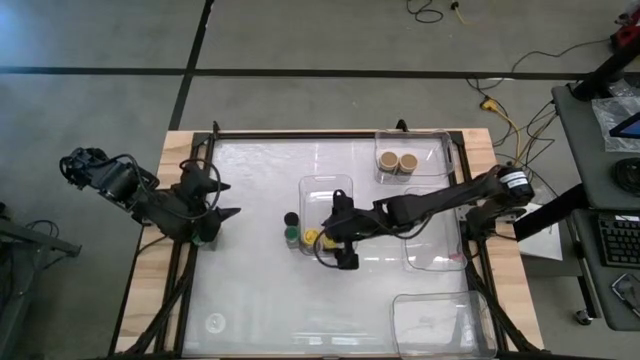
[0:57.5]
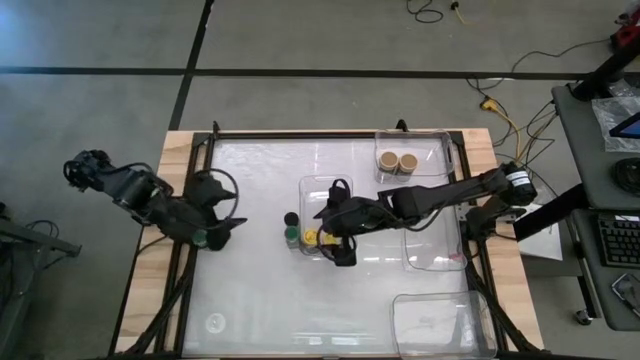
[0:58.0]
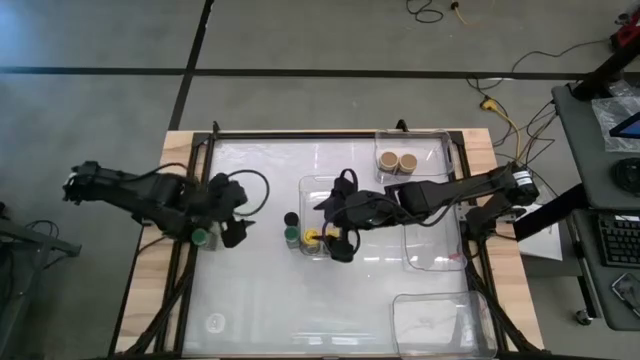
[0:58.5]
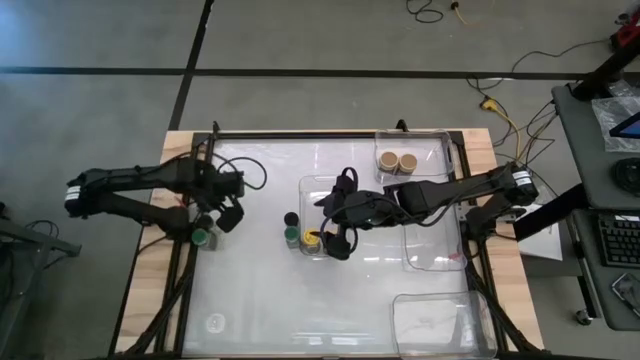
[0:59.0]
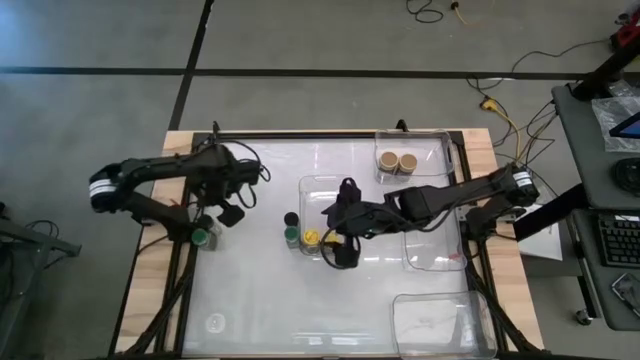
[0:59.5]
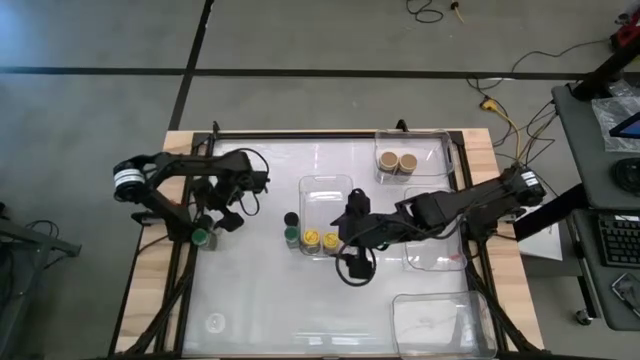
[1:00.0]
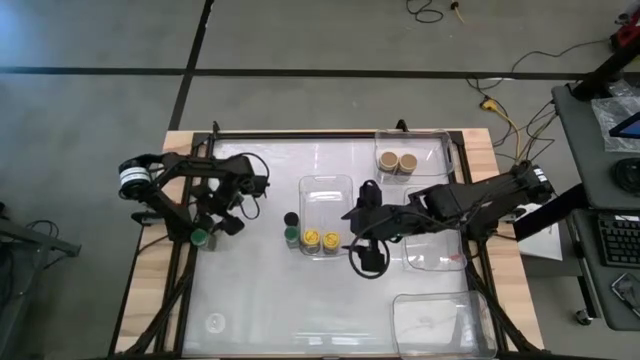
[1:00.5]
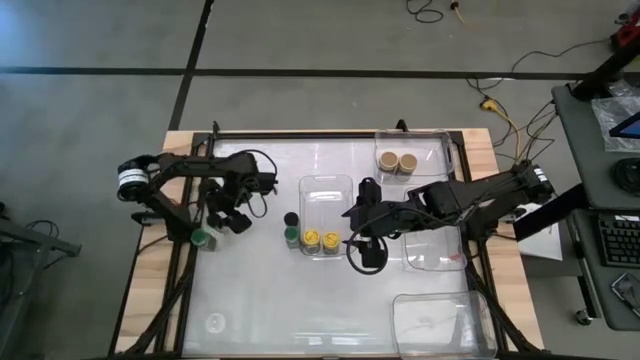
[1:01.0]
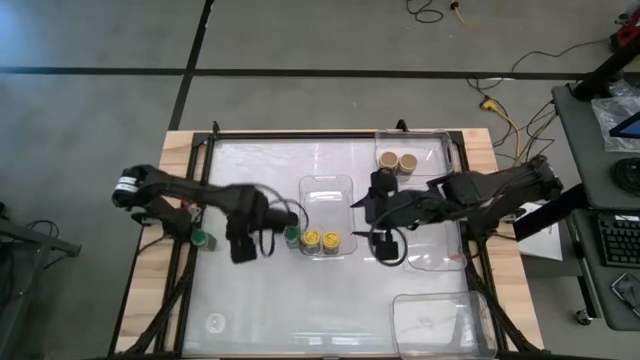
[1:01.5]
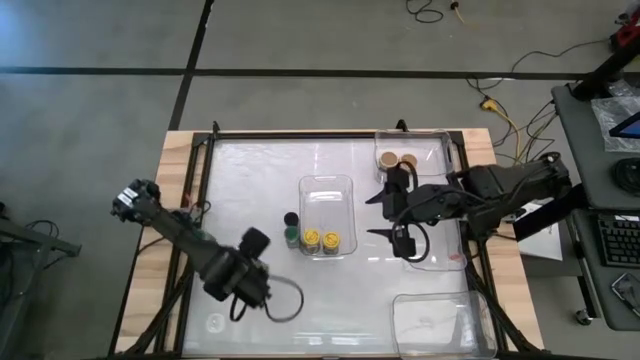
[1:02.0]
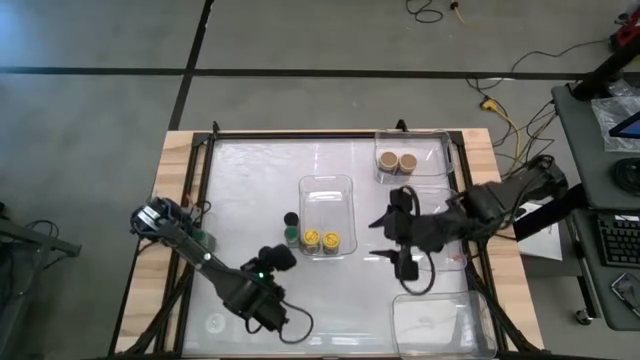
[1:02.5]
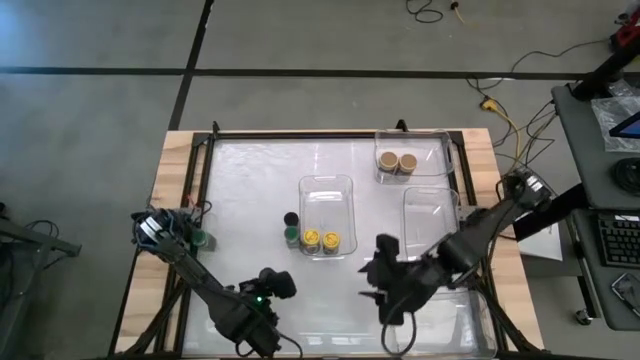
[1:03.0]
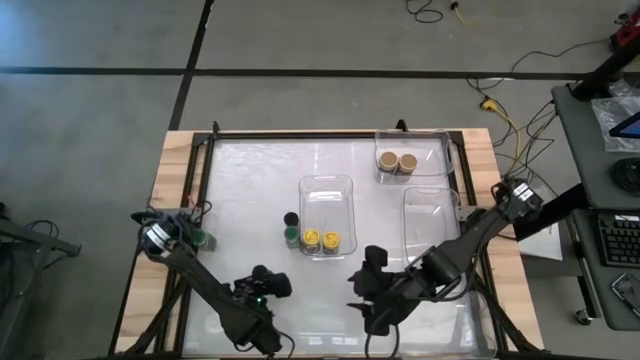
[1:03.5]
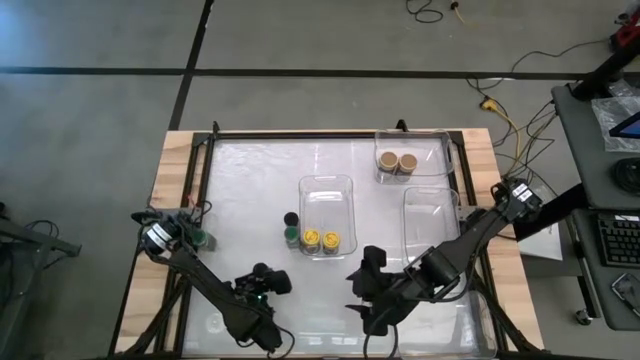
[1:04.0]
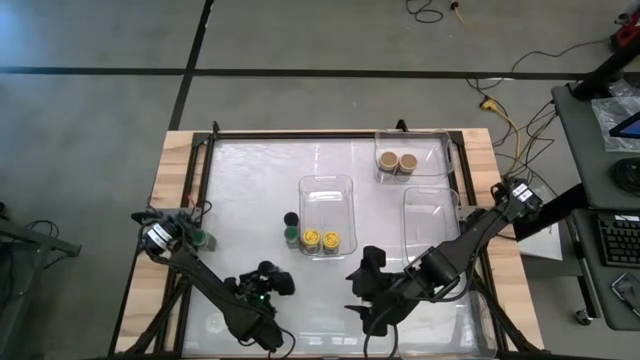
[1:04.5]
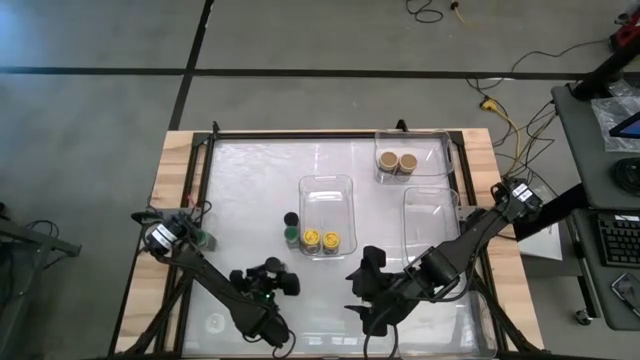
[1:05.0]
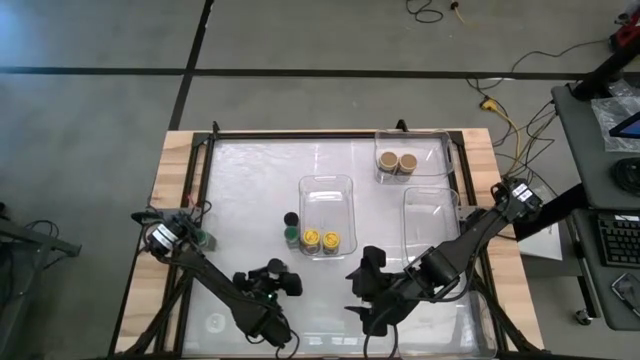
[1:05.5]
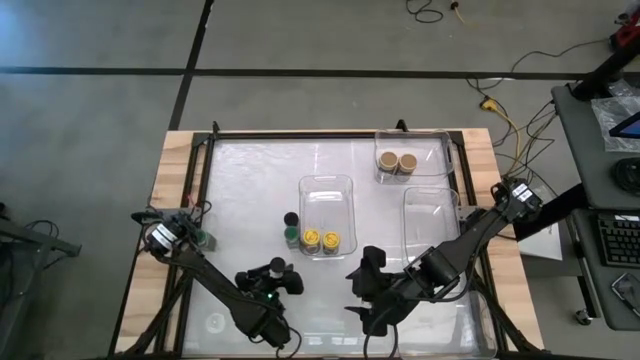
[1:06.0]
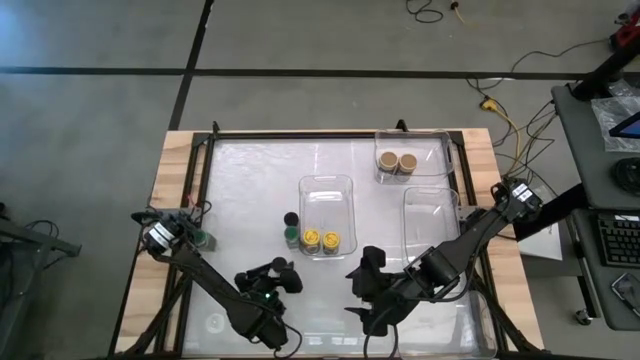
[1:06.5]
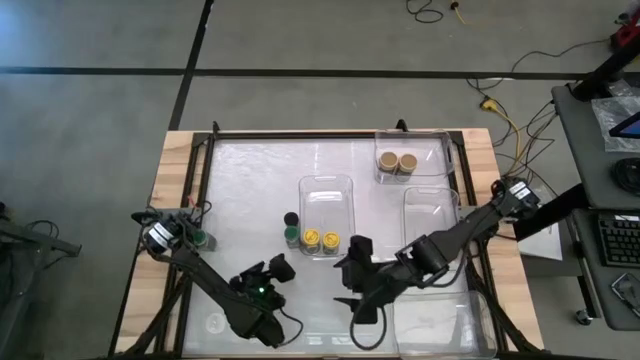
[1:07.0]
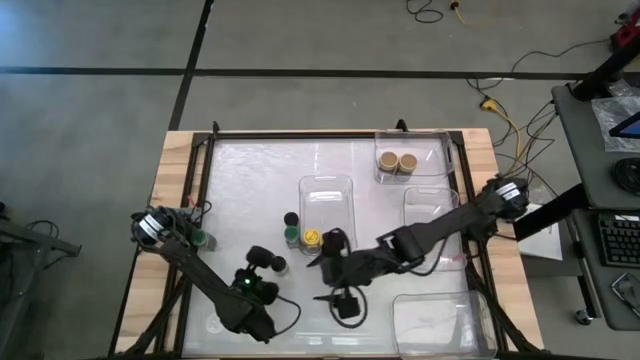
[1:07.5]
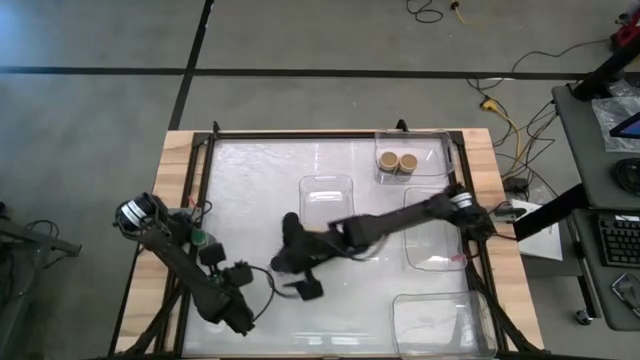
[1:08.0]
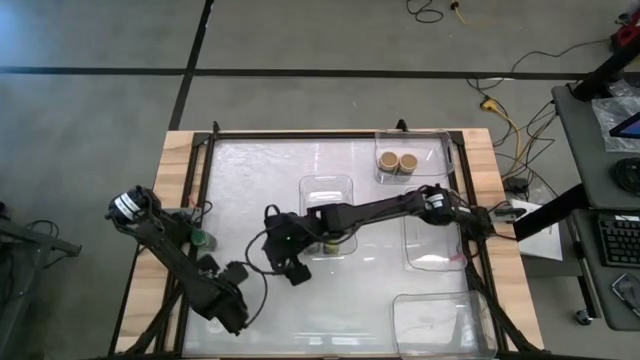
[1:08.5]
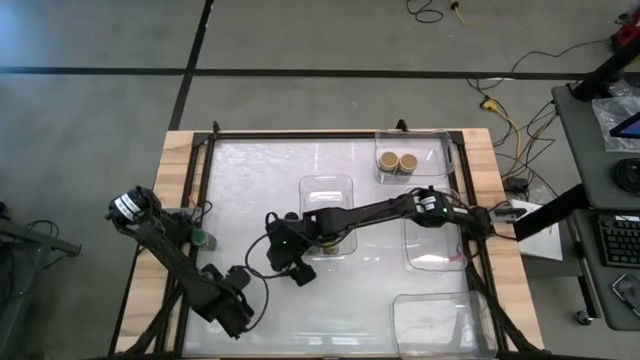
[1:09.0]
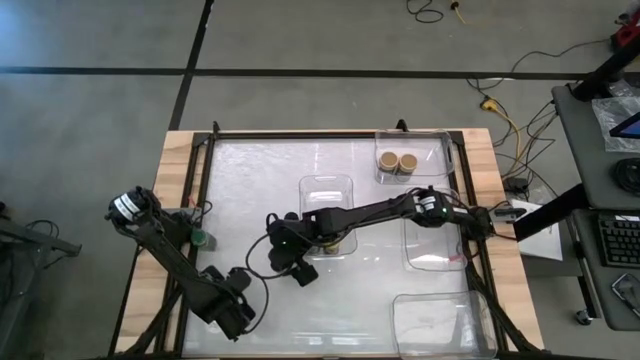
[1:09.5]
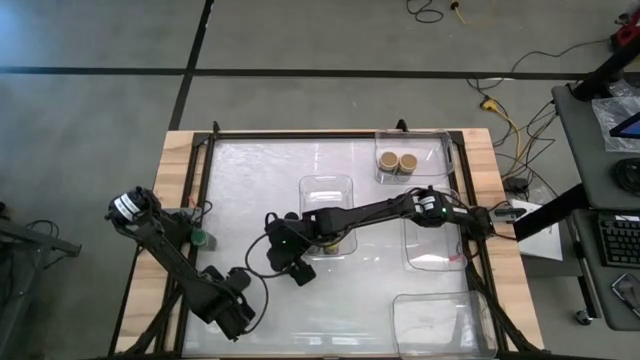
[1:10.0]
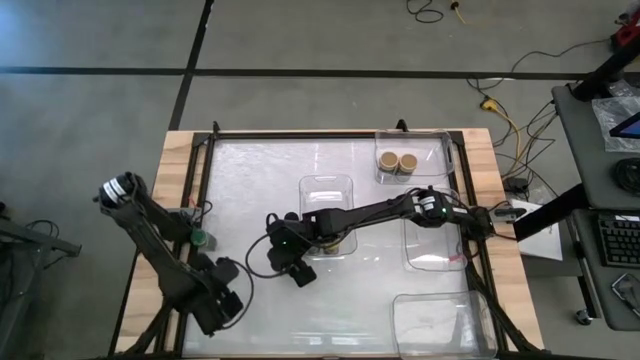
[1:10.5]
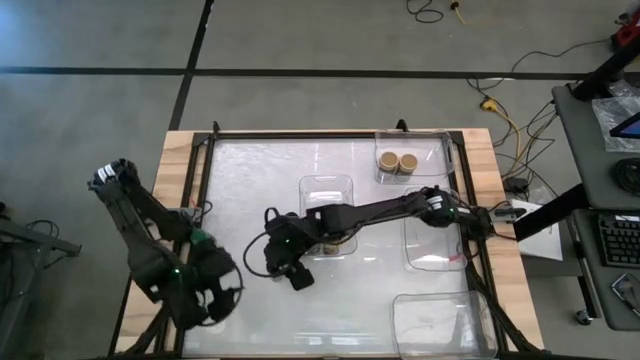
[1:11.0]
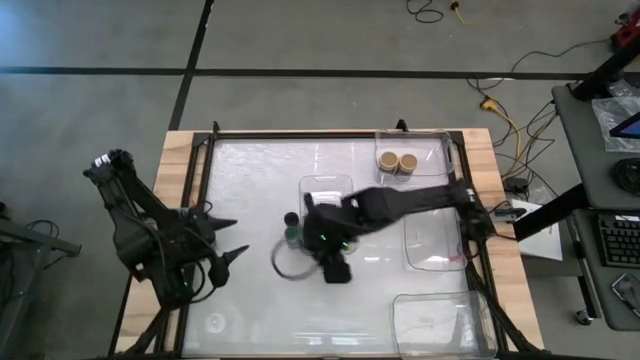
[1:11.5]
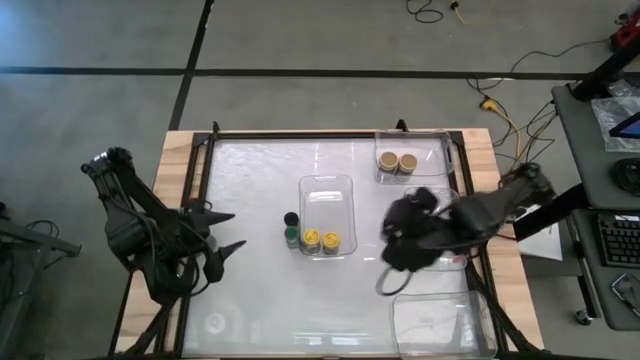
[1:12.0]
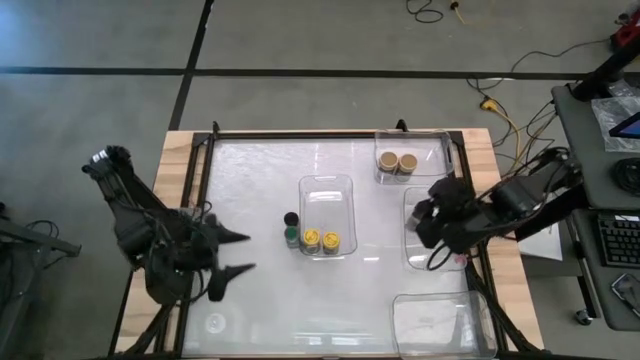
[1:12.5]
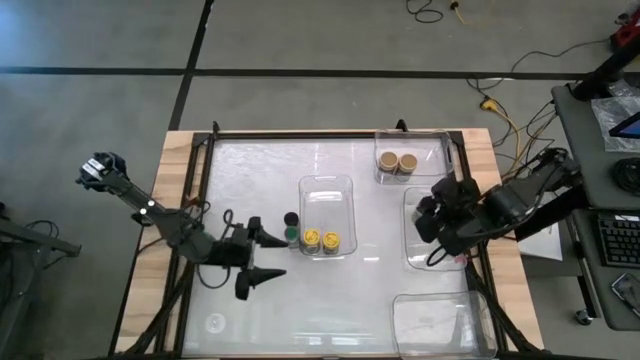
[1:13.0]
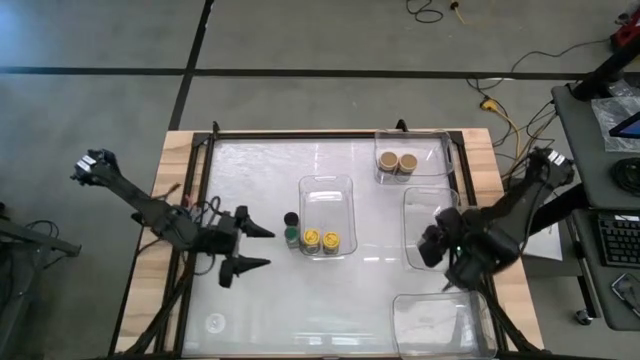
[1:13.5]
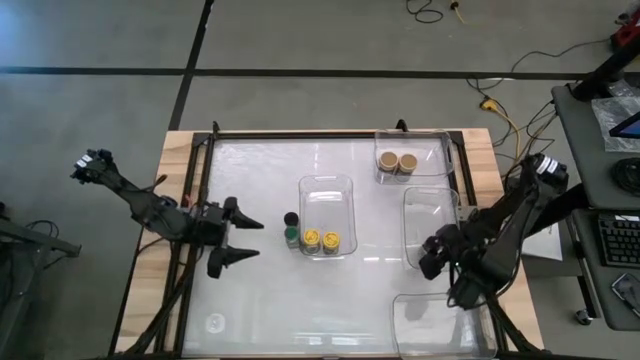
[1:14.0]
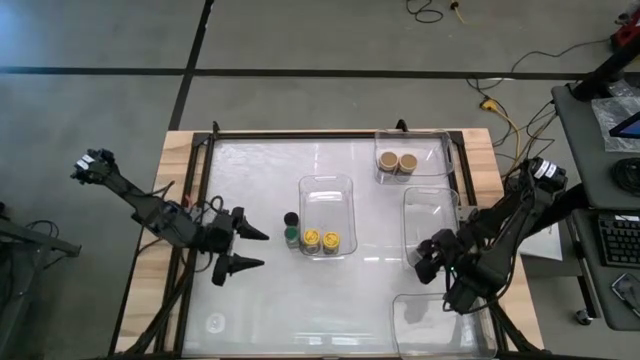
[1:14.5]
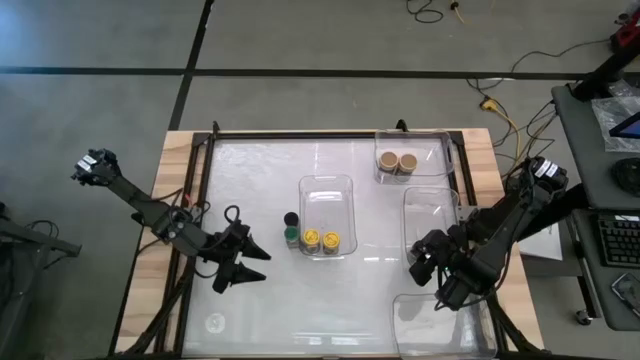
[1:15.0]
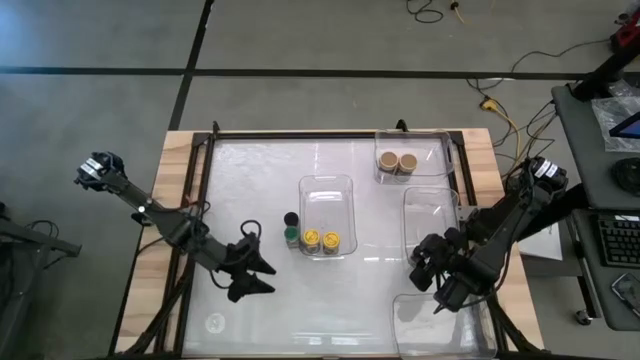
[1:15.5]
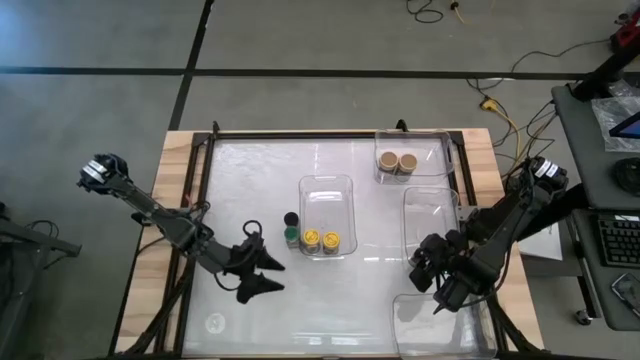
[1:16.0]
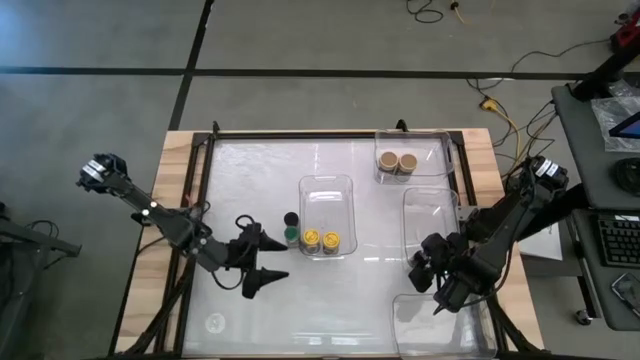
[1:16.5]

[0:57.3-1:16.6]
Task: Sort spices by type
Put the left black seasoning bottle into the middle right transparent bin
